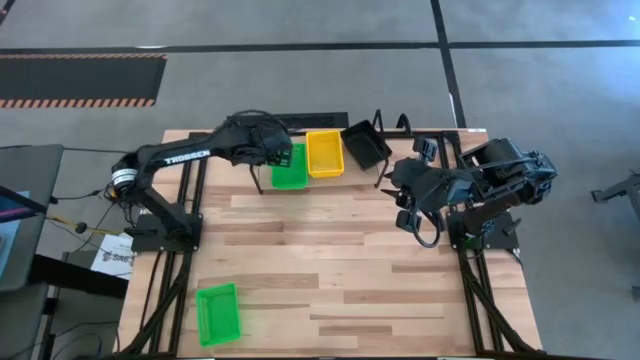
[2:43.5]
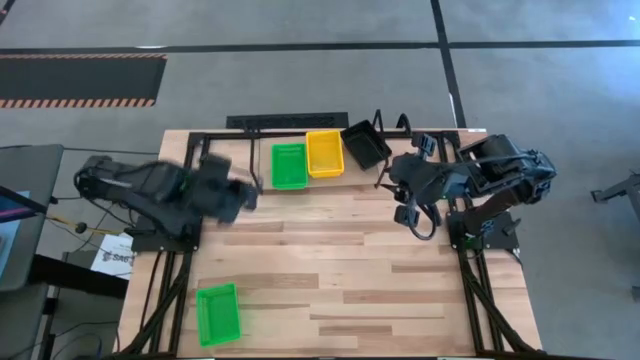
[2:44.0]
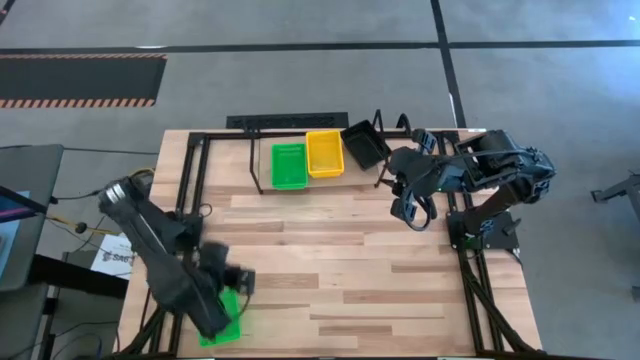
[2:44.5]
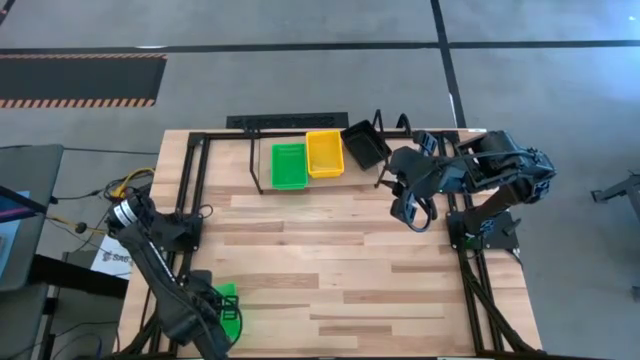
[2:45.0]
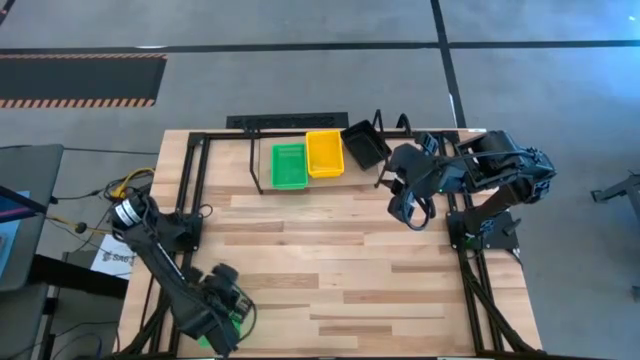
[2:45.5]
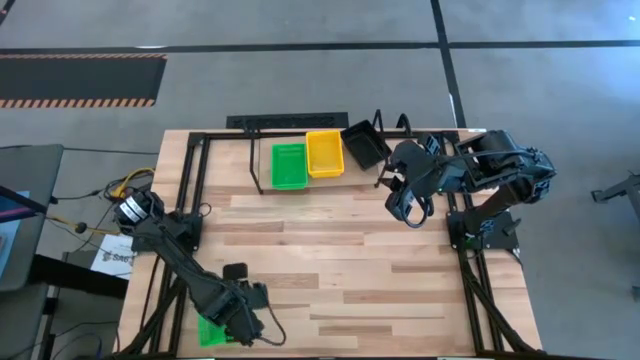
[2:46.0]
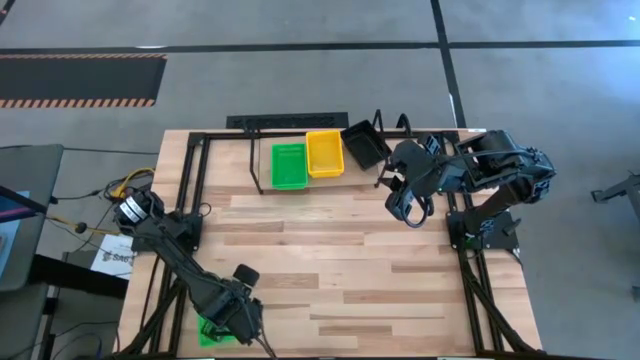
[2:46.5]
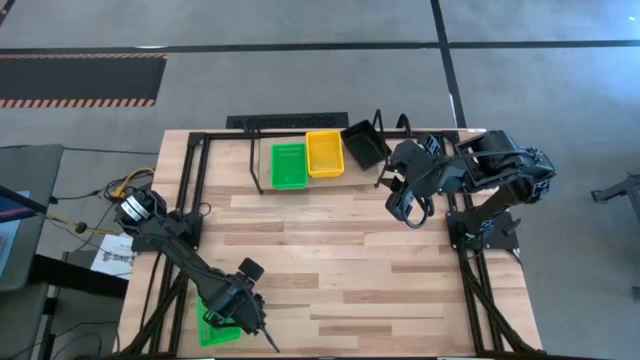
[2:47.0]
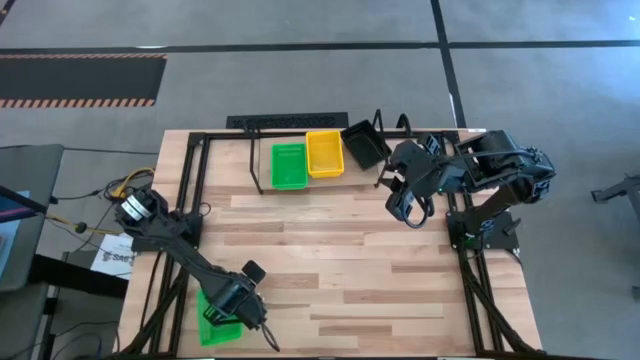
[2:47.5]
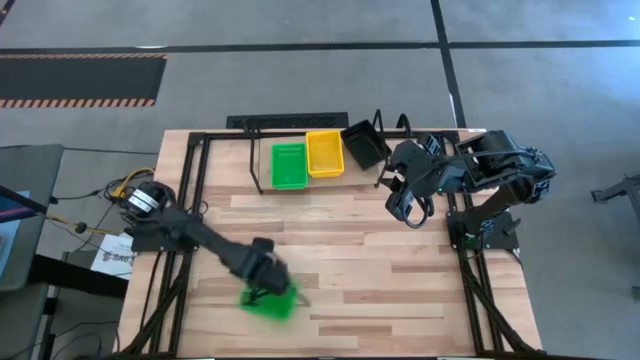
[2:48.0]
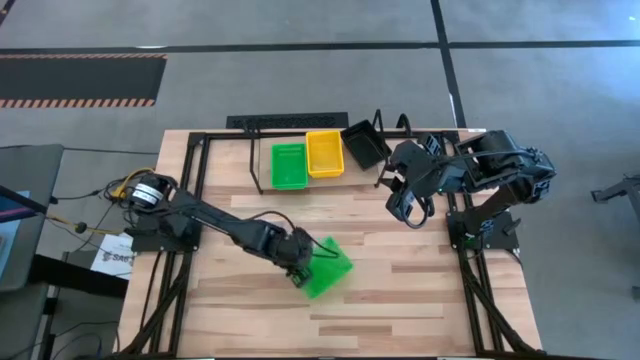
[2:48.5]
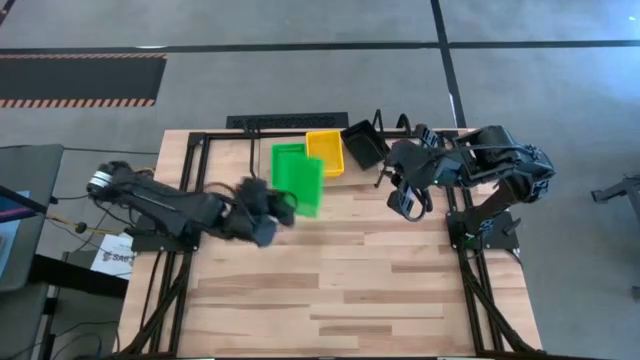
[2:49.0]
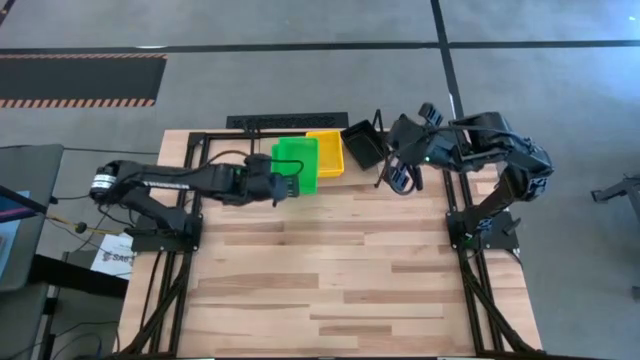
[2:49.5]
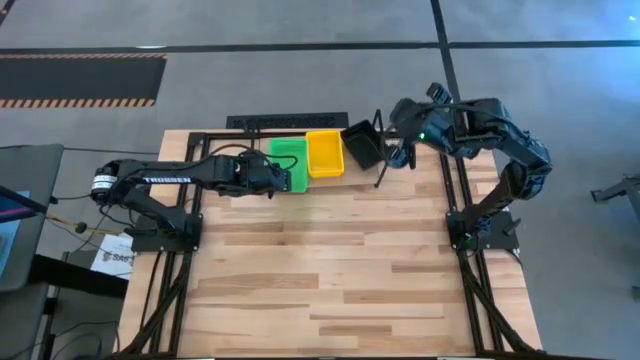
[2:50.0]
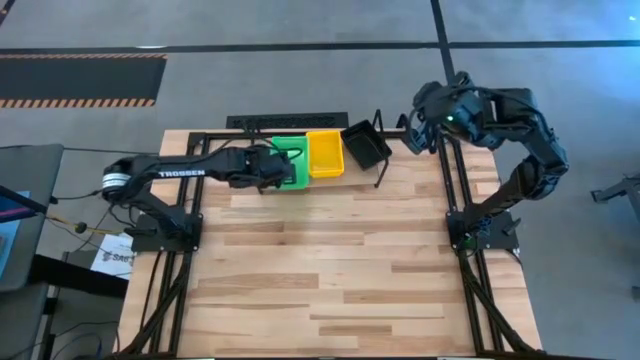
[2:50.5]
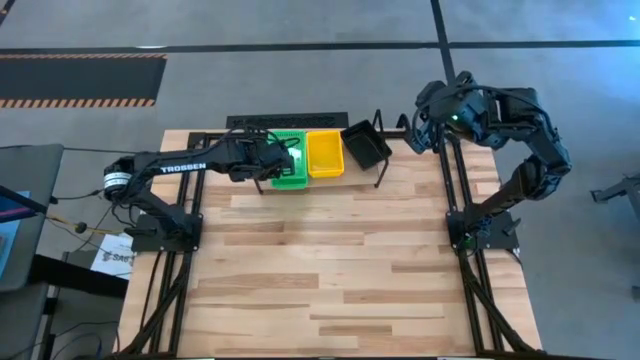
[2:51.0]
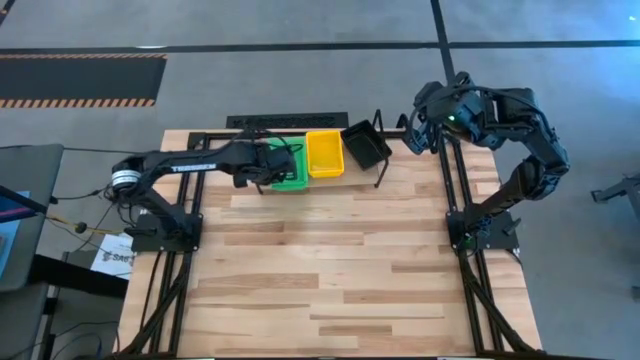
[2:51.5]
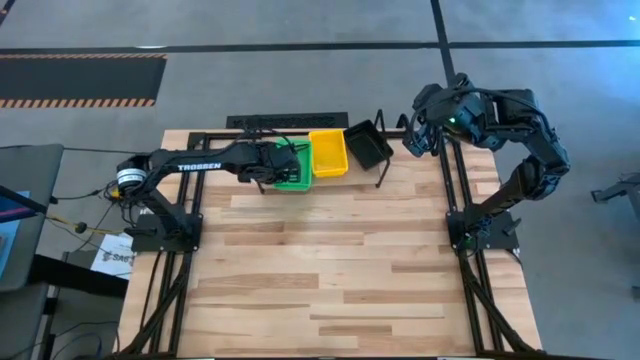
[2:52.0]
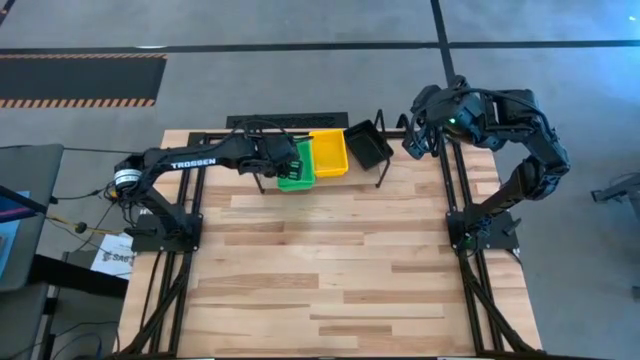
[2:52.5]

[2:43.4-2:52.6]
Task: Stack baskets on shelf by color
Stack the green bin on top of the green bins on the shelf

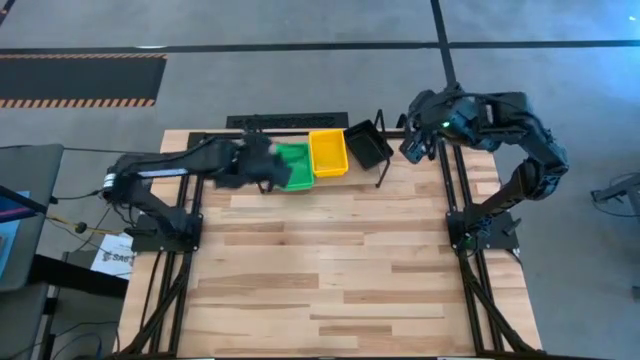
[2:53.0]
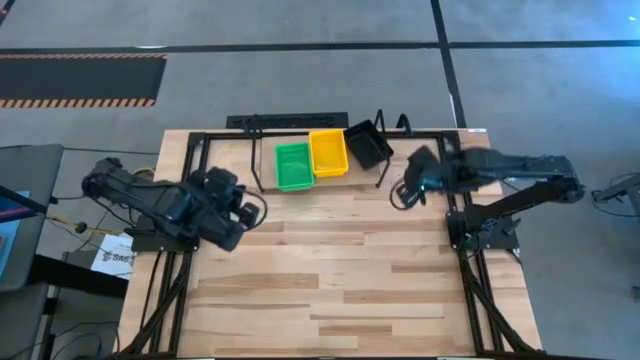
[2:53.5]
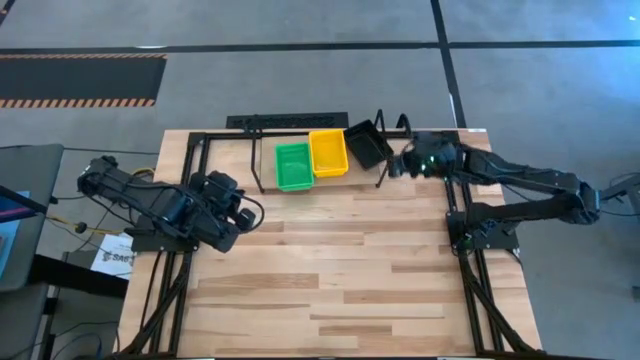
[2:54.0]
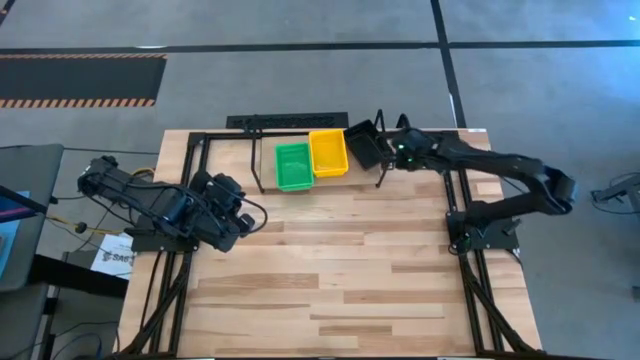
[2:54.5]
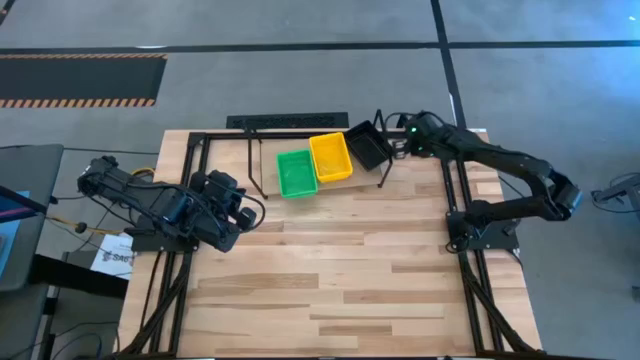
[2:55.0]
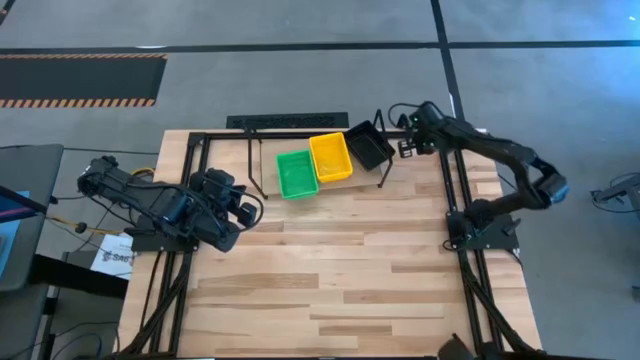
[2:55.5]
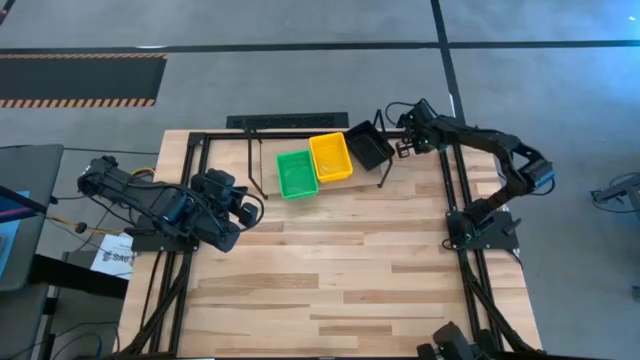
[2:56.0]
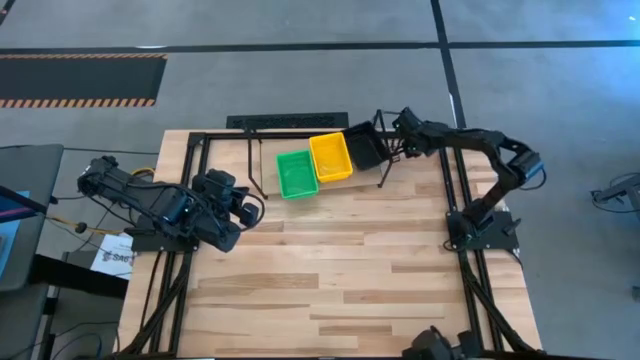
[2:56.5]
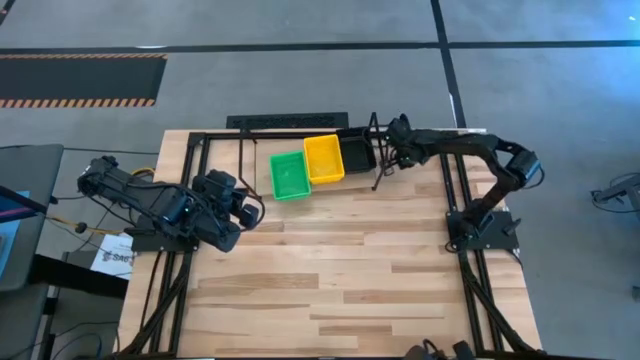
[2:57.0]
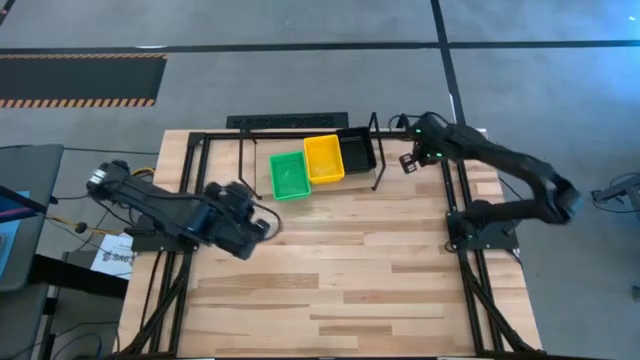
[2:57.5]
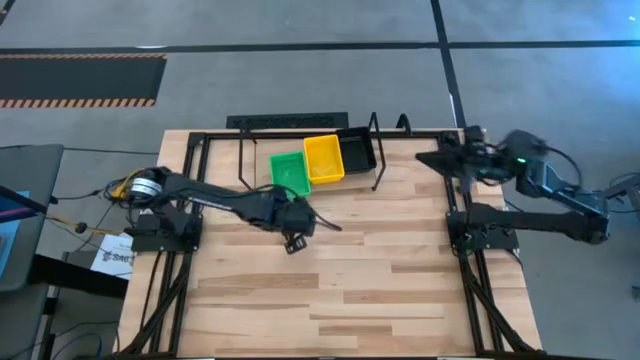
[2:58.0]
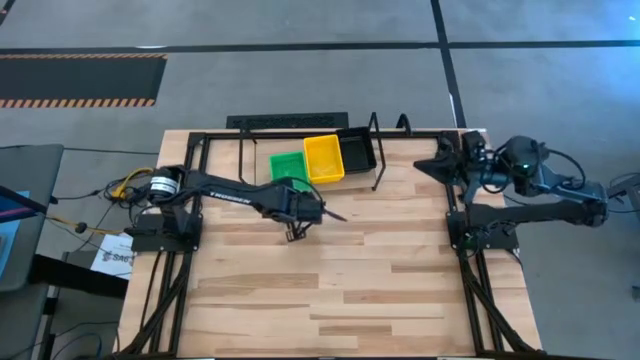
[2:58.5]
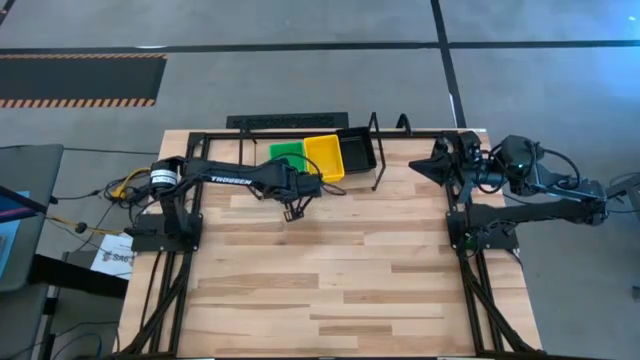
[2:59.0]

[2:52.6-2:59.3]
Adjust the stacked bins on the shelf

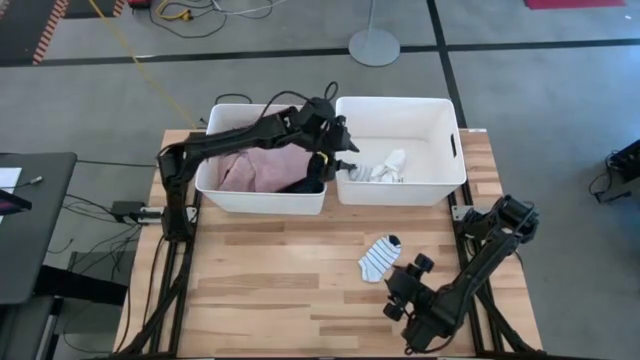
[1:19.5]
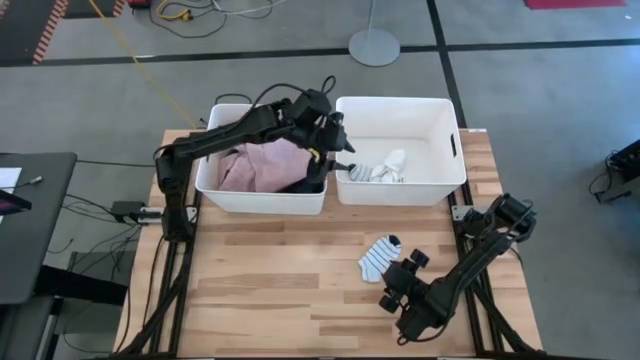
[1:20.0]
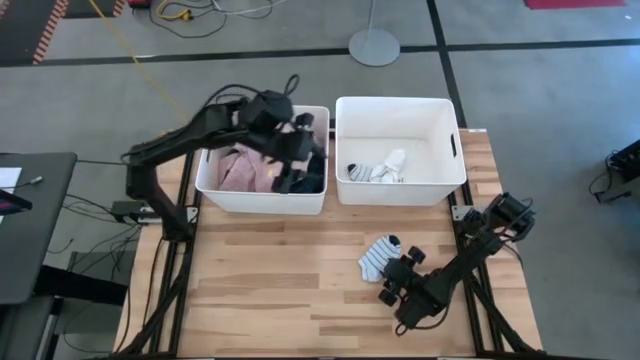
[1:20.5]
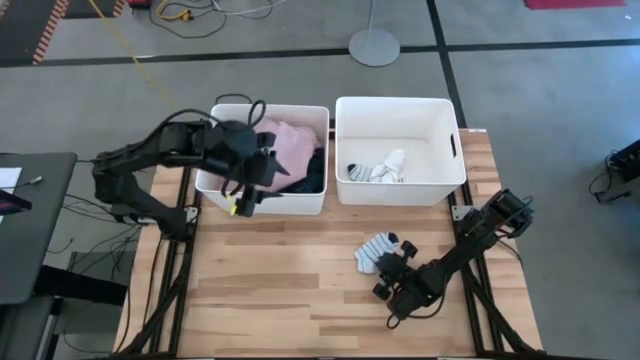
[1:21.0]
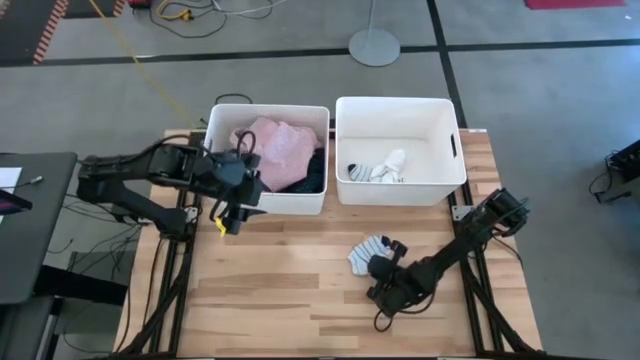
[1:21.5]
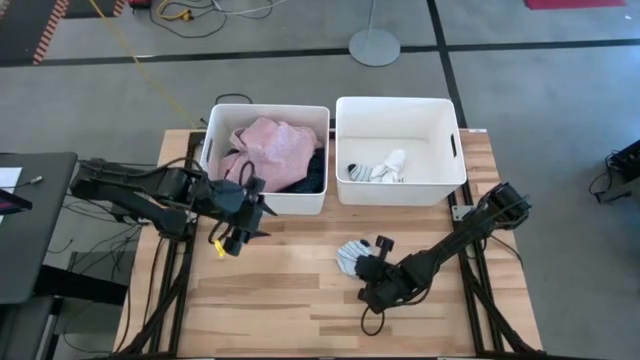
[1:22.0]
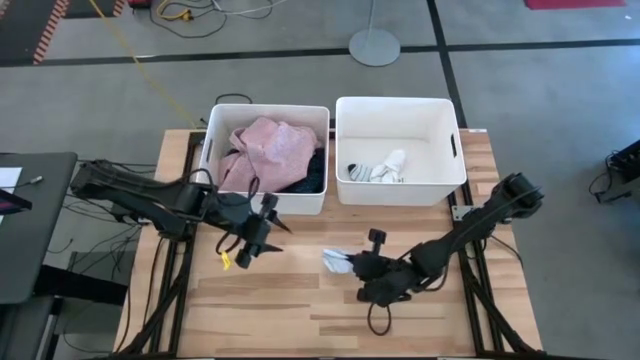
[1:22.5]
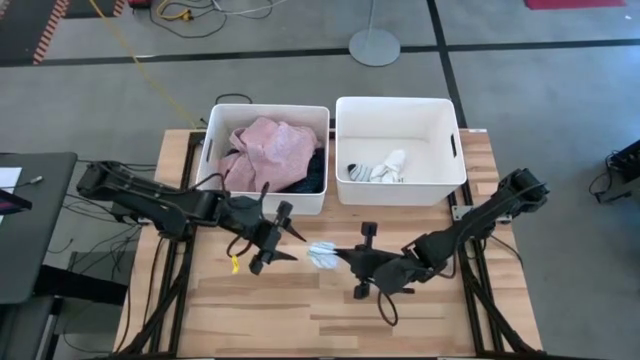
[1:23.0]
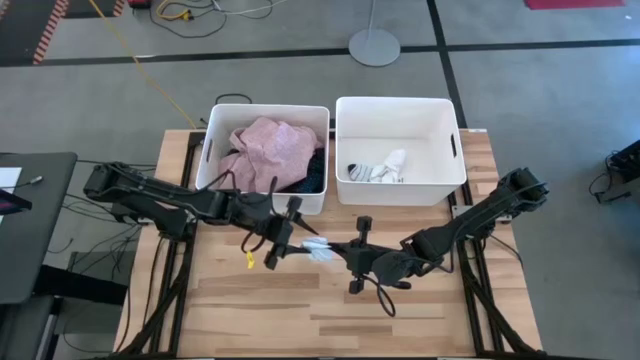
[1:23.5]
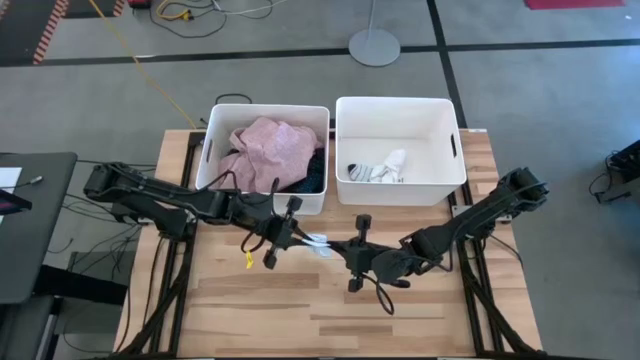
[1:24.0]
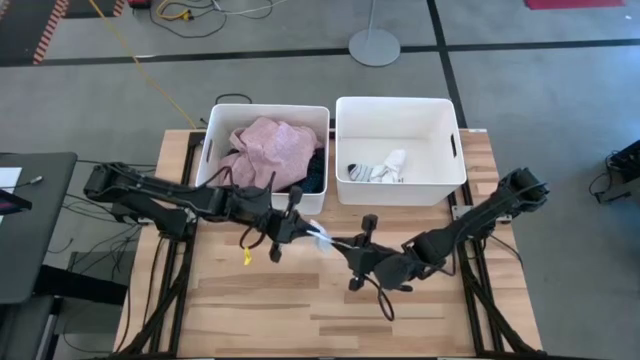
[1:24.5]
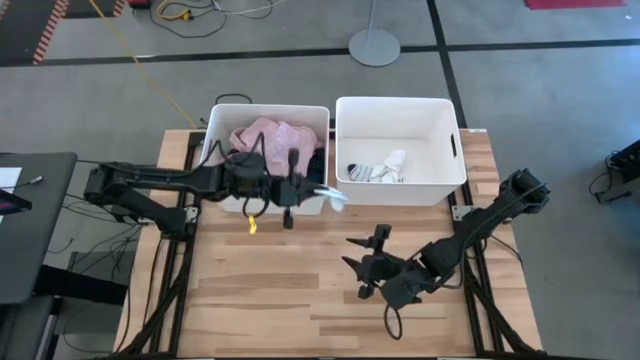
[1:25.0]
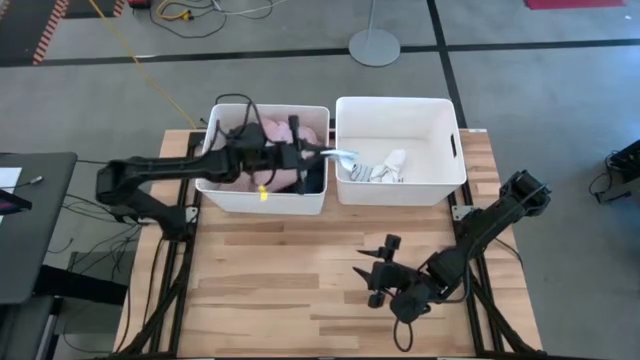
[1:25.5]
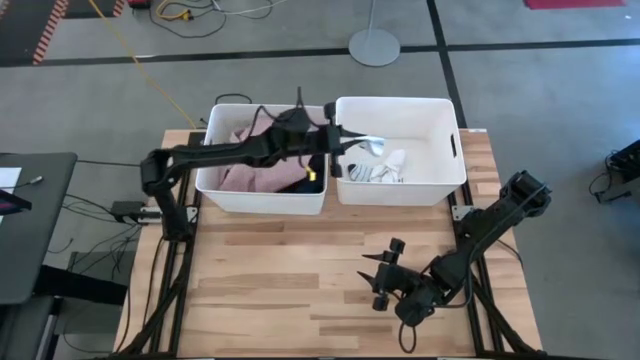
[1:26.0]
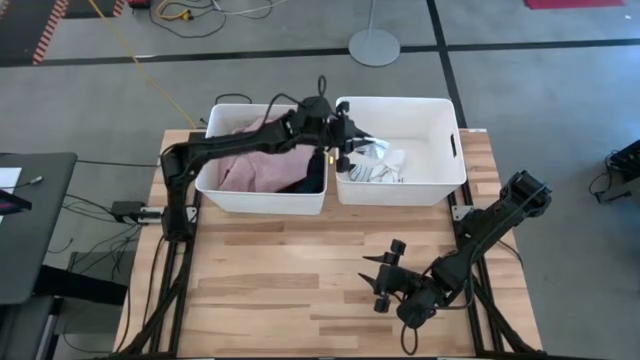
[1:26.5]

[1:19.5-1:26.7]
Task: Sort clothes
Put the blue striped sock into the right white laundry bin
